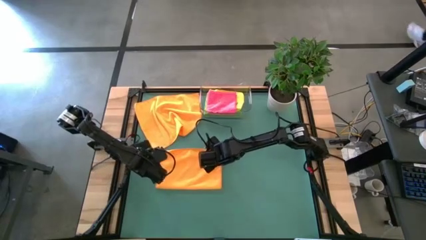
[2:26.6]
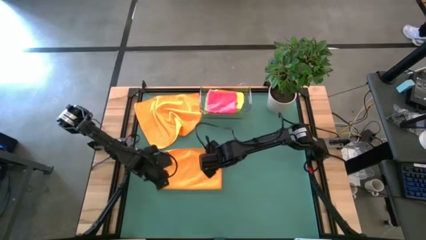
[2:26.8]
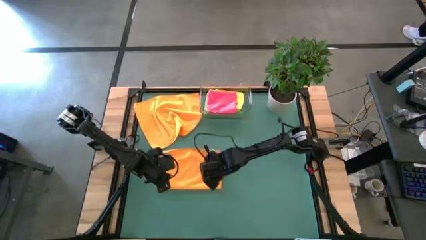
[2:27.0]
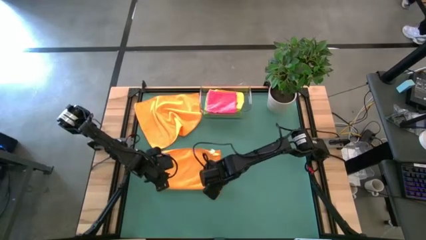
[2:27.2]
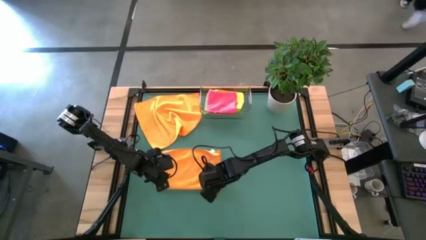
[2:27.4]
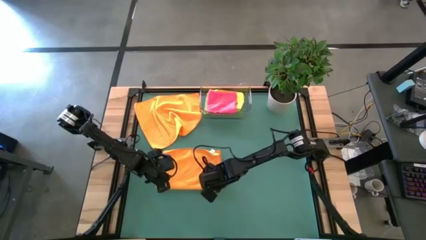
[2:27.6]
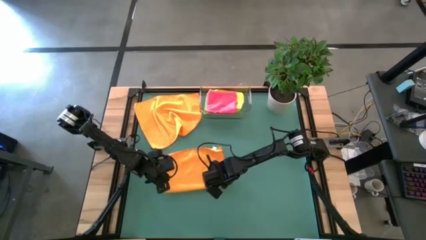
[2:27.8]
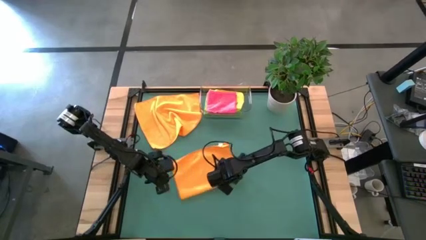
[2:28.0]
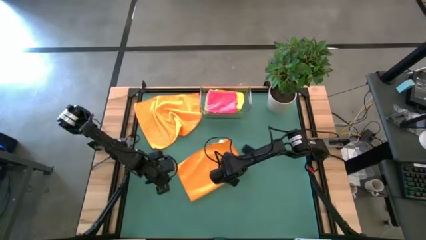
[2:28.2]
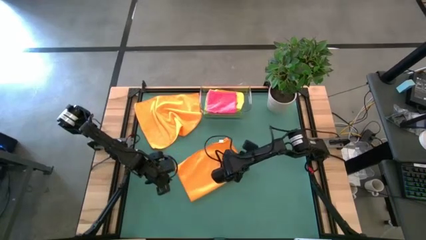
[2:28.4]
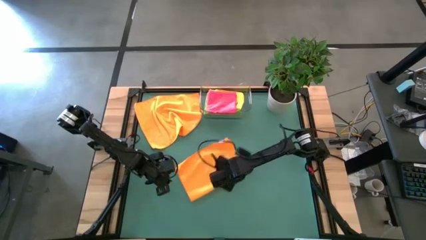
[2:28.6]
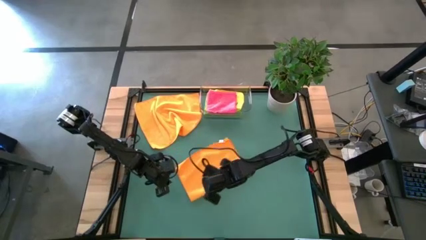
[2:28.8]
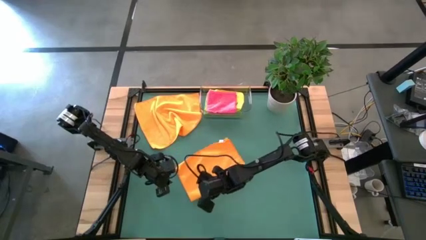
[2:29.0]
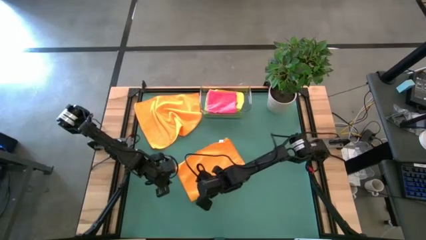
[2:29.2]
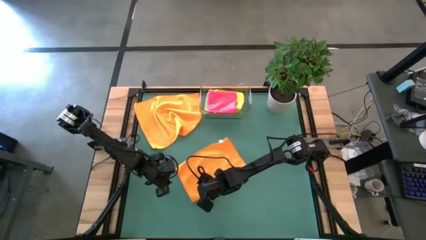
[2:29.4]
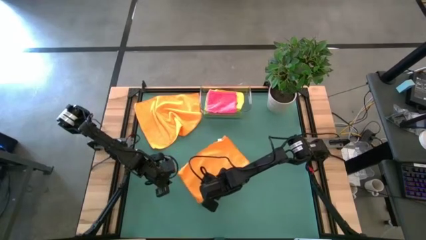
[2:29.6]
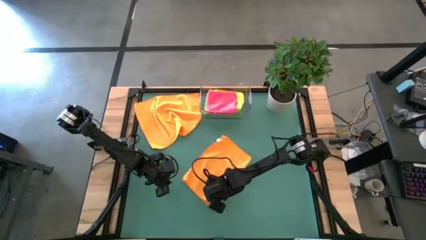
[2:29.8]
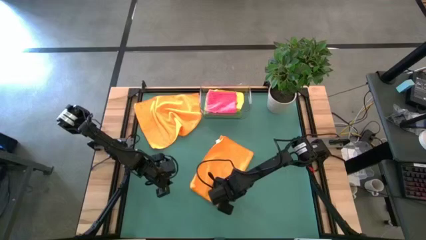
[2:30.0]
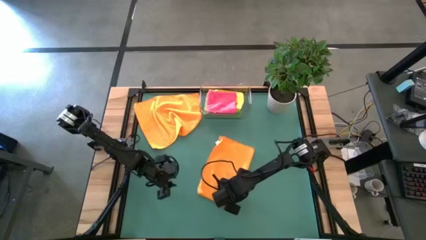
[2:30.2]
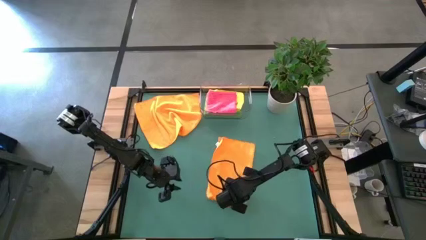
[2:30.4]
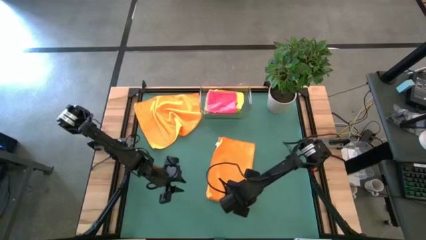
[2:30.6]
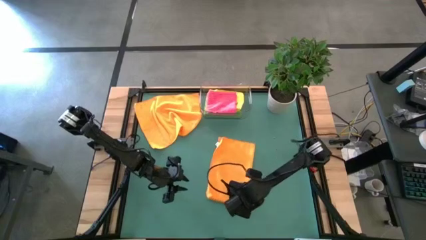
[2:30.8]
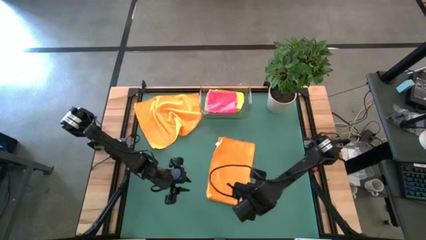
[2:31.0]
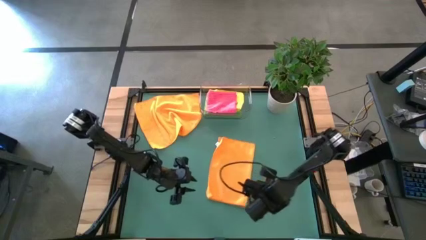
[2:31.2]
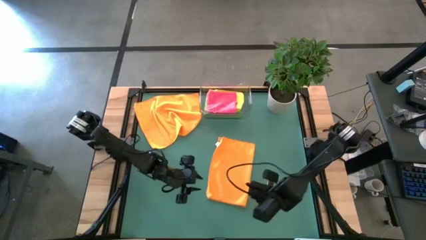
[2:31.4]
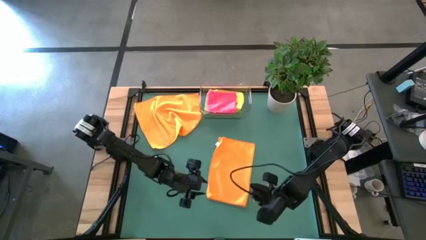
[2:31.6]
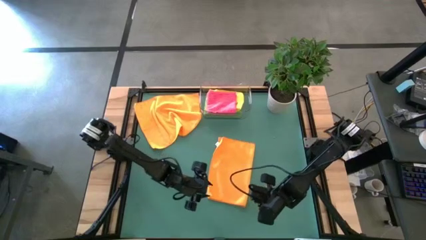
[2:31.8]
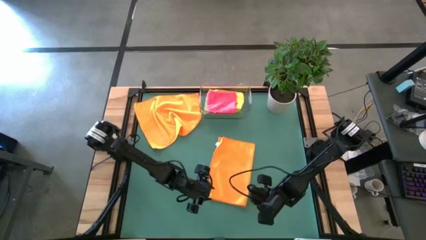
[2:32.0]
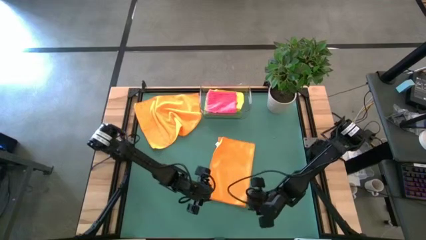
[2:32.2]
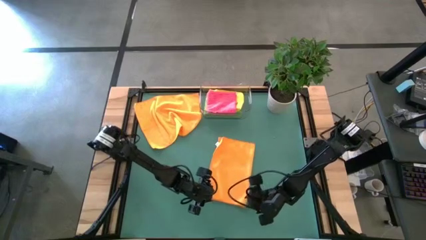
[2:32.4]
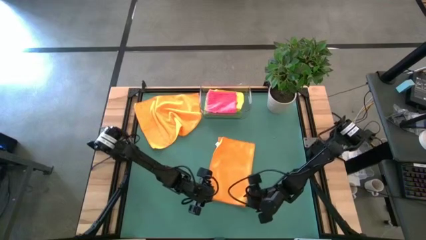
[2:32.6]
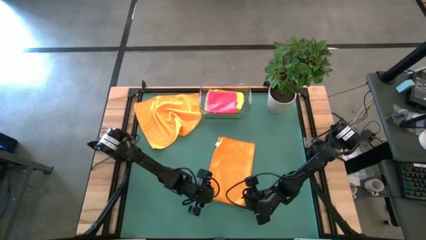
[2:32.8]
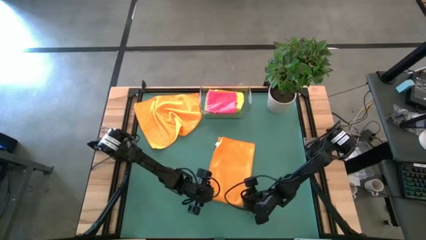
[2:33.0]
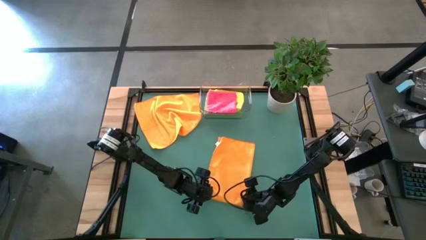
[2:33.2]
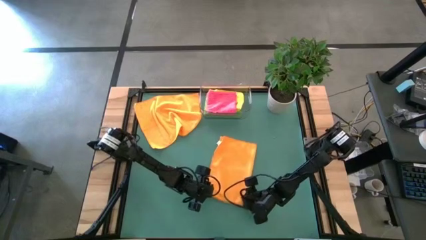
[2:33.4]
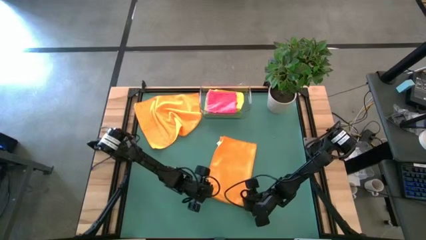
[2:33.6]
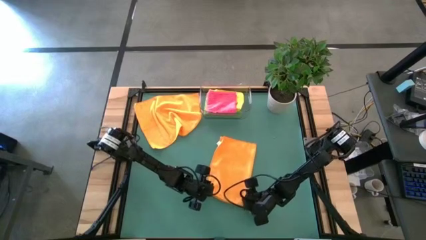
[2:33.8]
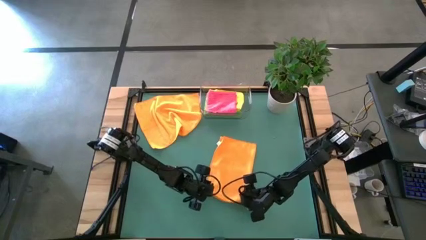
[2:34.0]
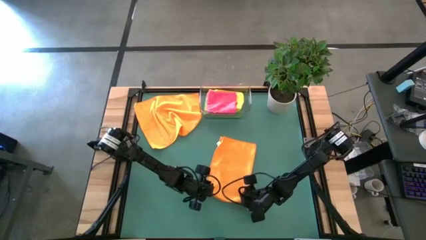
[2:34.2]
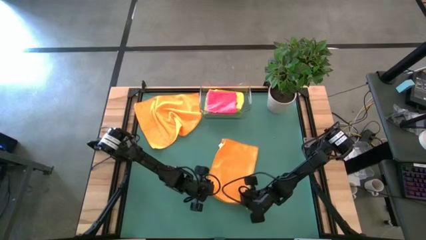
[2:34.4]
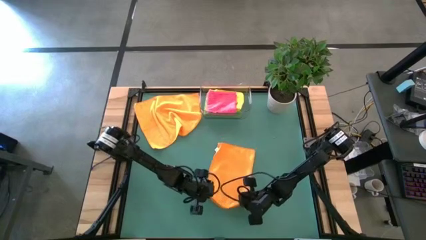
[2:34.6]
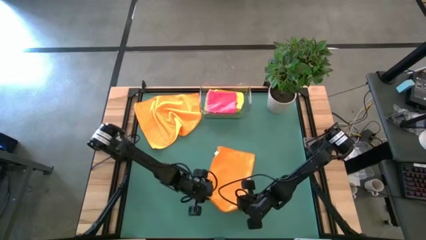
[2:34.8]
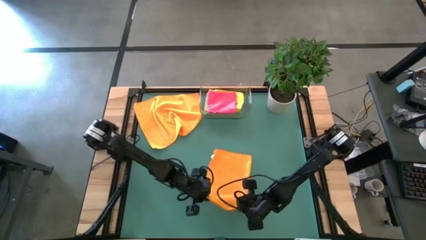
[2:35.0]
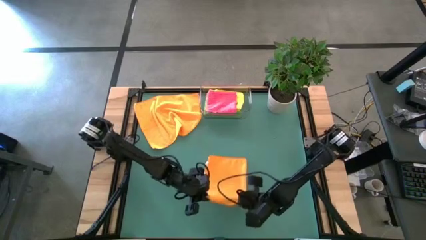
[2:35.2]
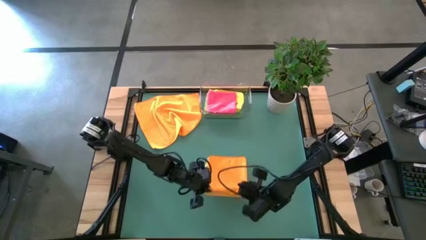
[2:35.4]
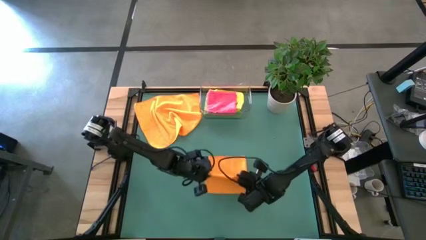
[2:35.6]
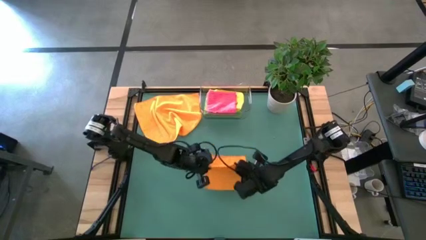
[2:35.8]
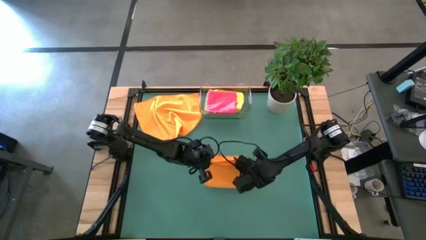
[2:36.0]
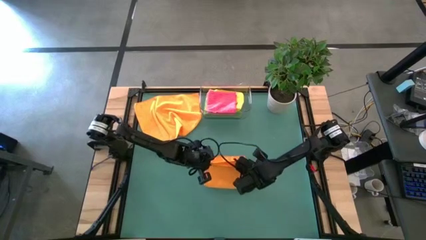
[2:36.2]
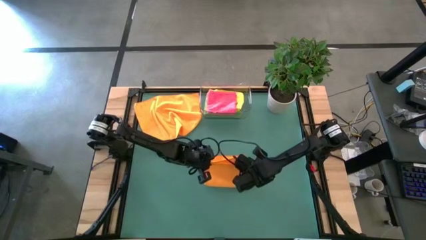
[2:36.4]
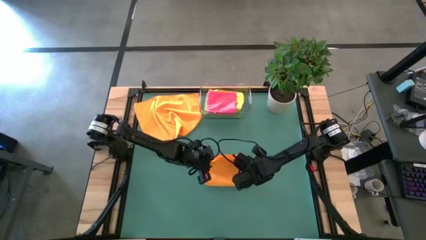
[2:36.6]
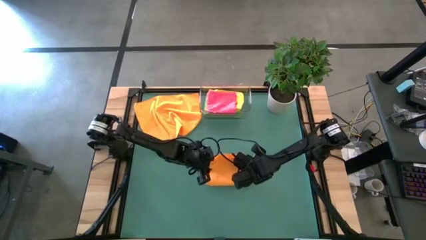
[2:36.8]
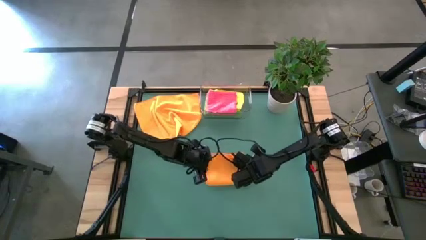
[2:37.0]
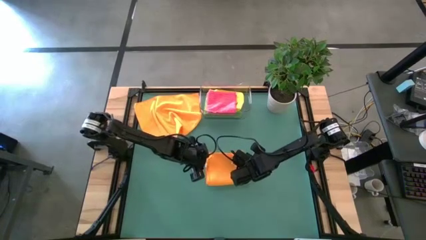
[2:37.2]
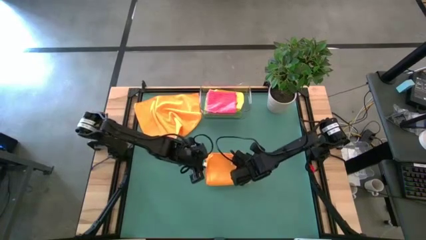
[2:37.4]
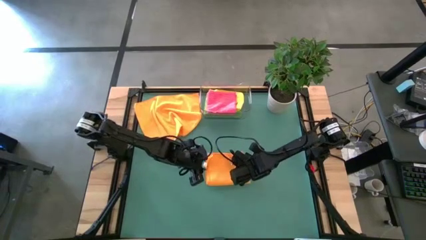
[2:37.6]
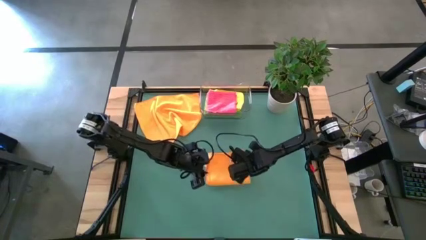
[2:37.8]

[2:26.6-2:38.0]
Task: Fold microfiber towels
Fold the bottom orange towel

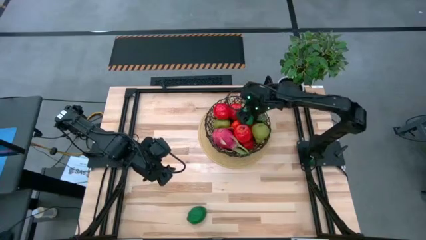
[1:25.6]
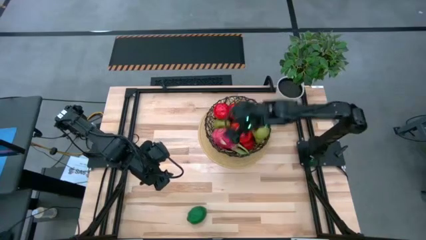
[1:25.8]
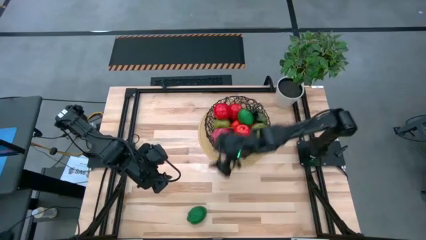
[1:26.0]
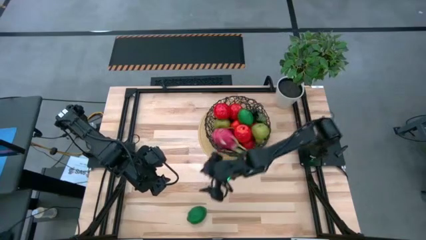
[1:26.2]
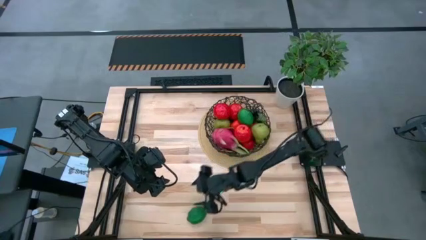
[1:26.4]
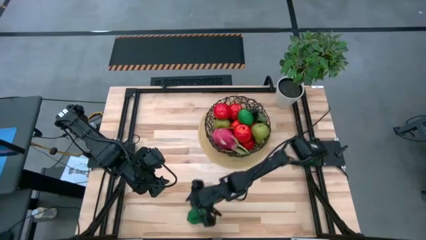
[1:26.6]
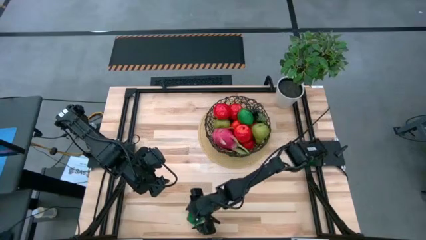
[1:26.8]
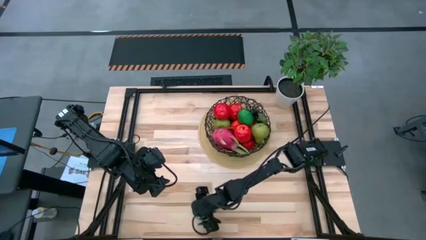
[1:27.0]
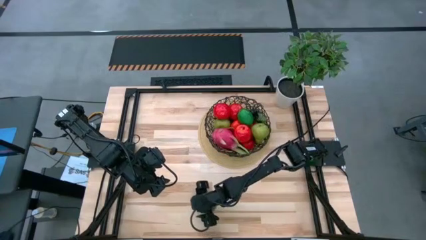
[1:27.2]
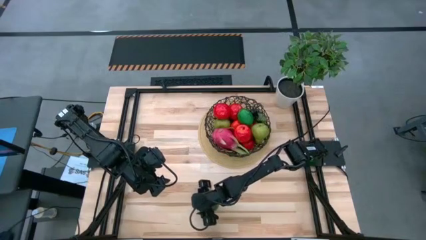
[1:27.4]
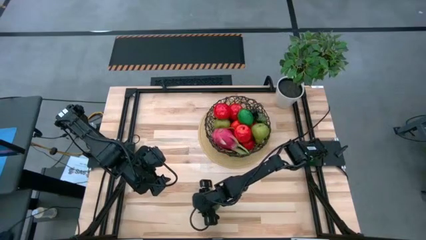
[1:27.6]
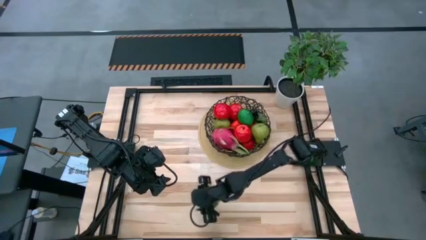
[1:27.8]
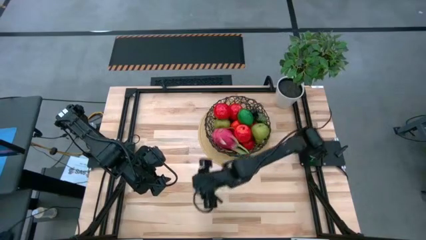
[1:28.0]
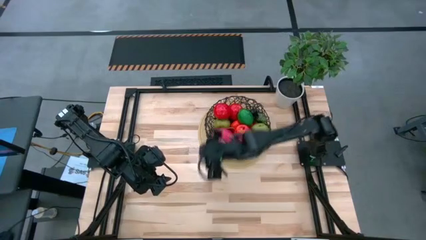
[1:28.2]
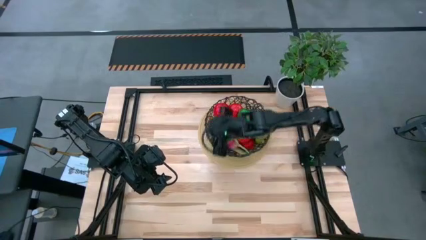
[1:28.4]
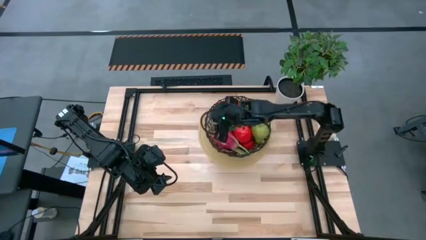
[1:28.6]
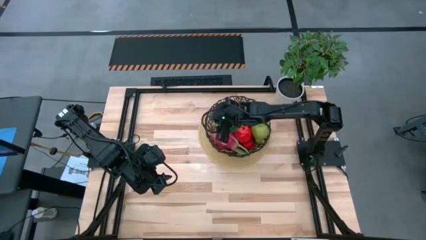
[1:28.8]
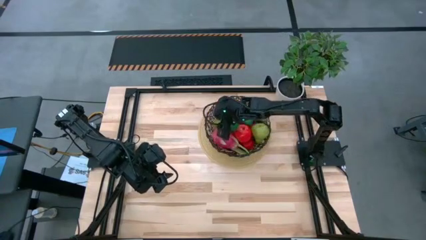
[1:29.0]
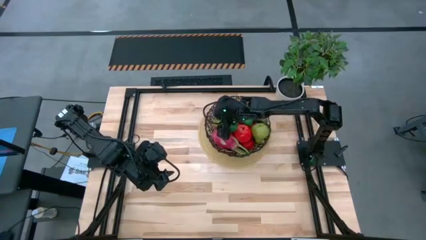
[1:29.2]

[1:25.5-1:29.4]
Task: Build produce basket
Put the green lime into the black black basket

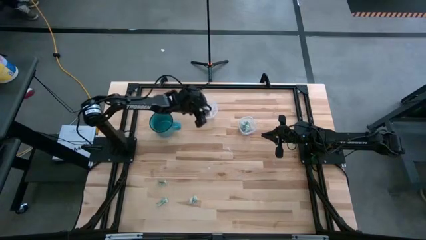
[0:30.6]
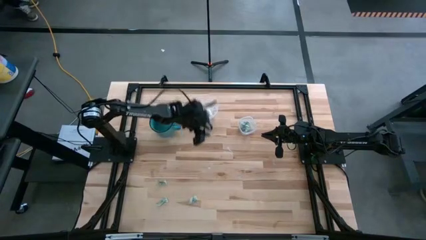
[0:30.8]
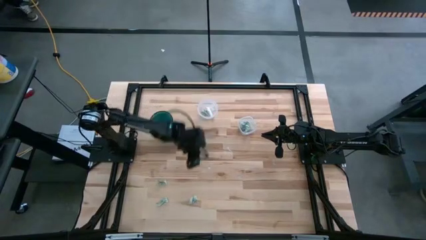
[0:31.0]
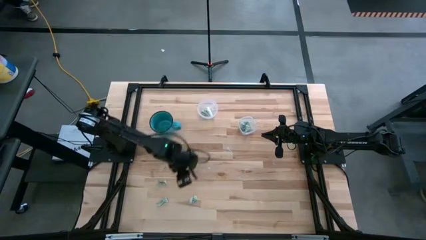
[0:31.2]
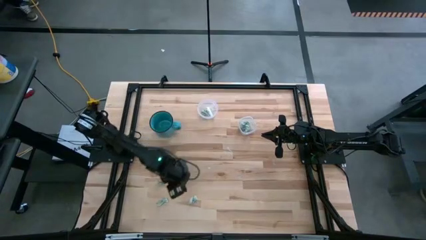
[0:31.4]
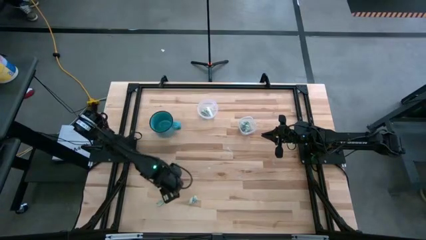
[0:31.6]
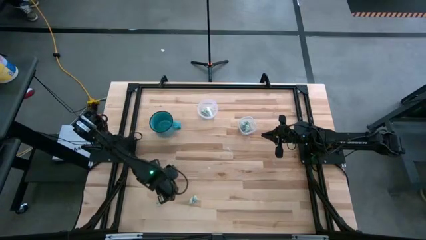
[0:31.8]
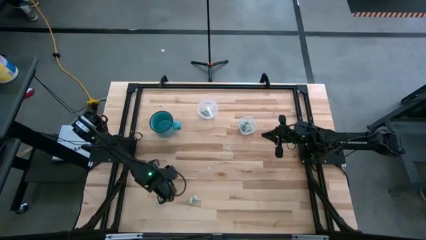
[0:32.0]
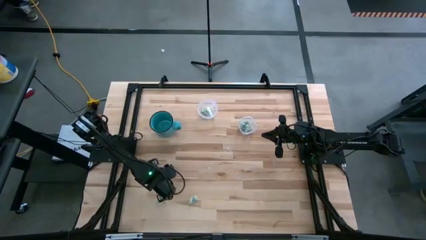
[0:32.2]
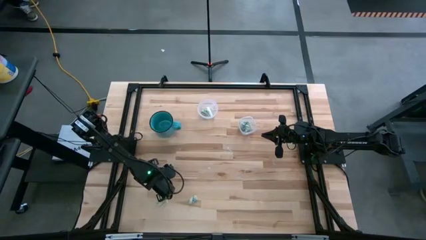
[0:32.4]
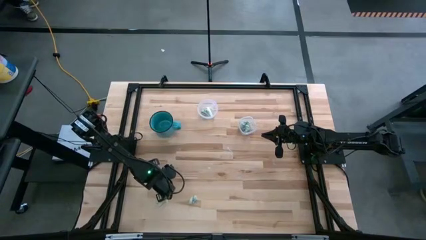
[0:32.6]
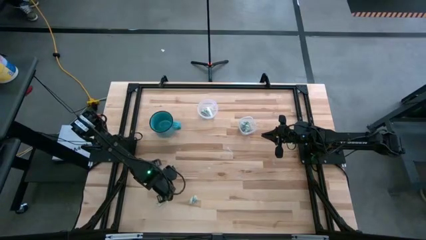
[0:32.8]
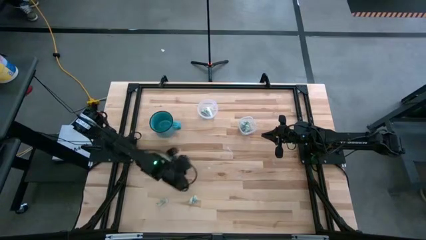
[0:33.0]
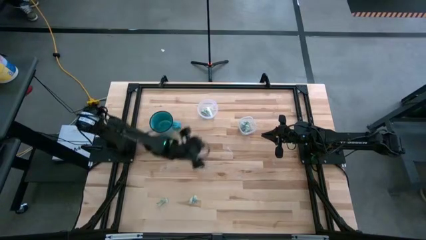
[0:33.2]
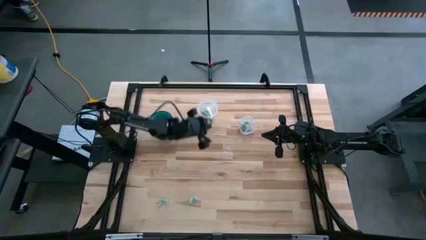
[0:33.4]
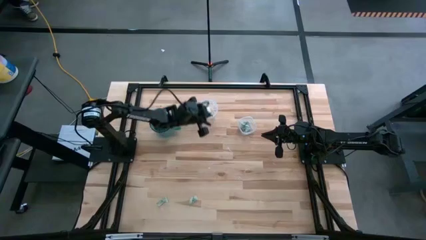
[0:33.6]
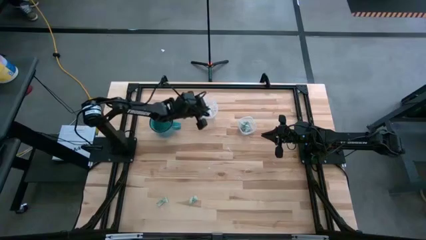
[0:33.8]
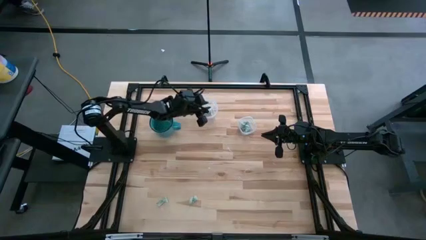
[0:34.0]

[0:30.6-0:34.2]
Task: Pick and place items into bin
Put the stevia packet into the large transparent bin
